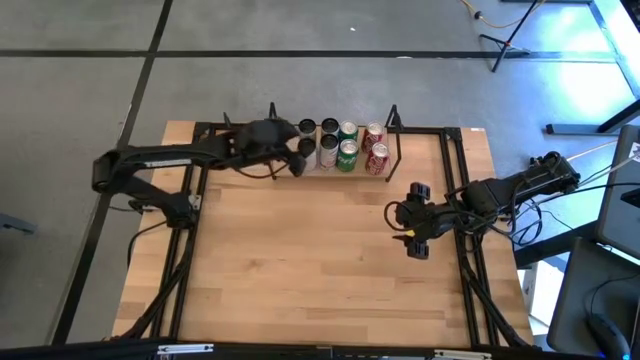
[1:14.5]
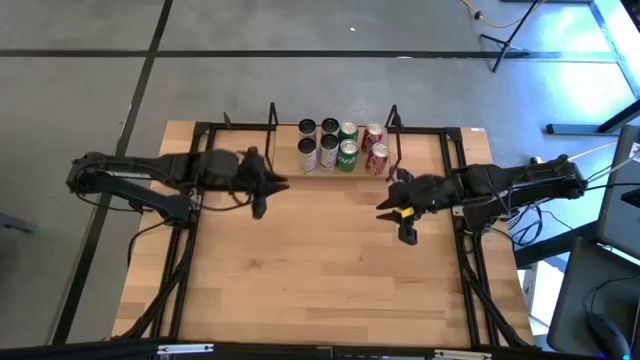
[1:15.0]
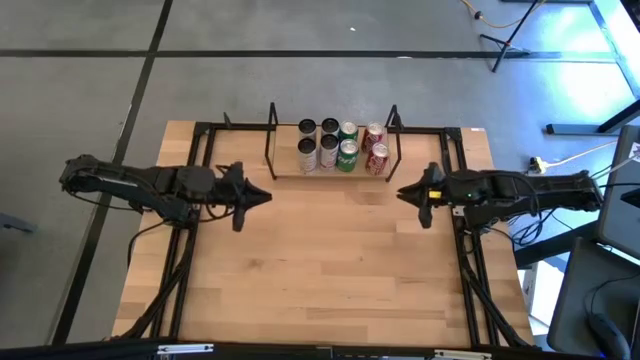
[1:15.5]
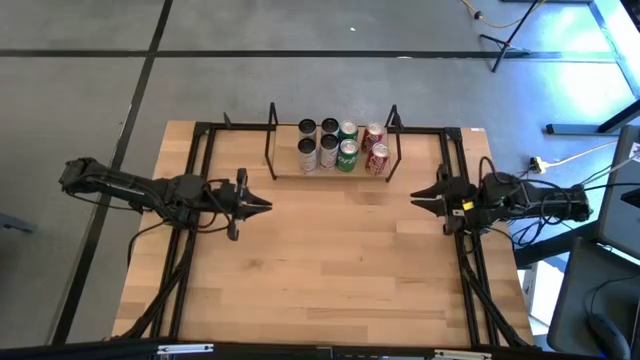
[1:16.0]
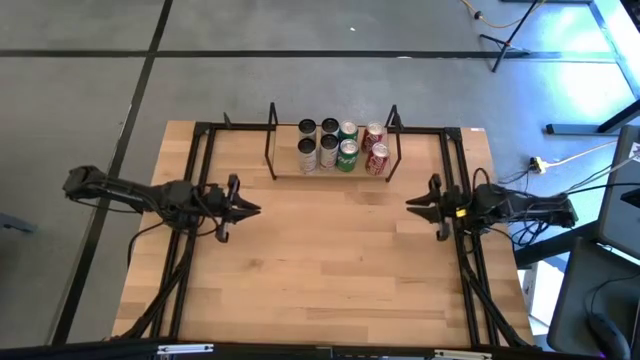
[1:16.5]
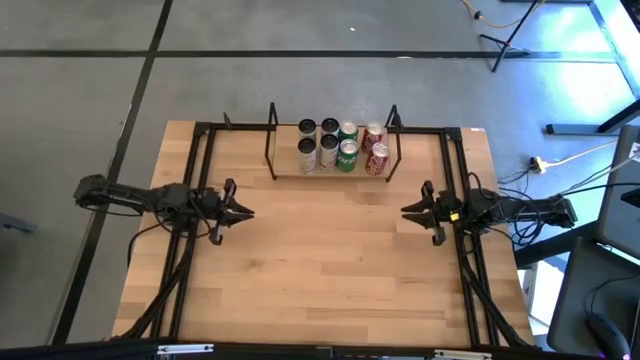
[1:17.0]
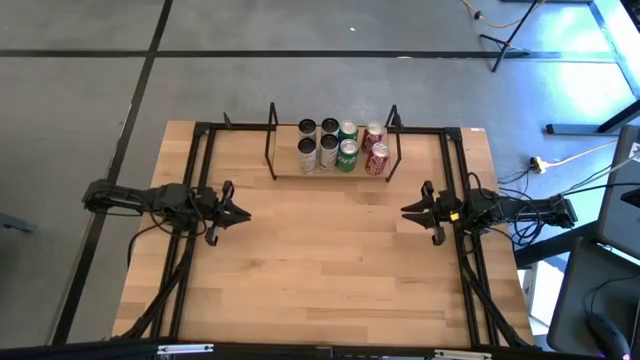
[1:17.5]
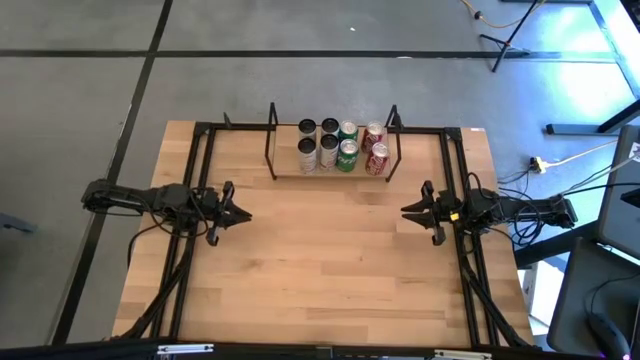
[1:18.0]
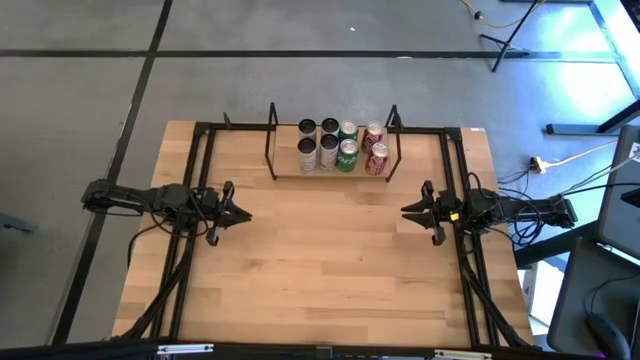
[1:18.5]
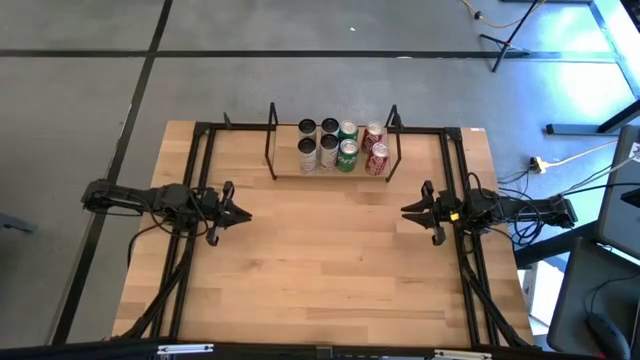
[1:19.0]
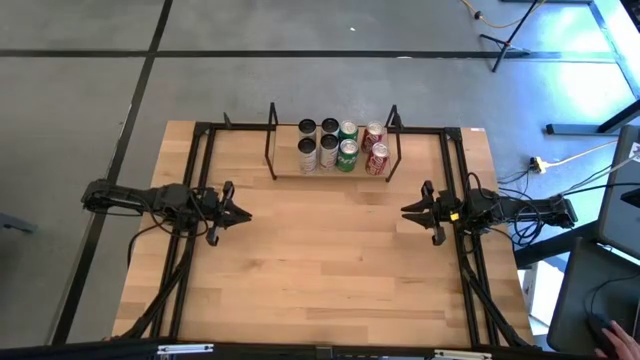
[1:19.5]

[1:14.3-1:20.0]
Task: Place canned beverage on shelf
Return to Home Position

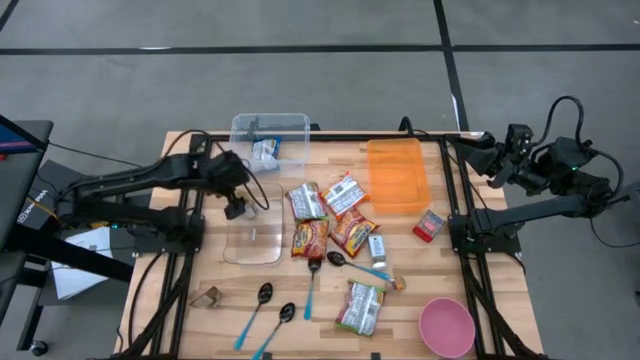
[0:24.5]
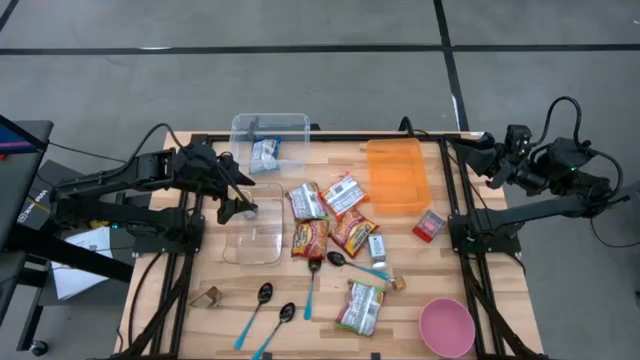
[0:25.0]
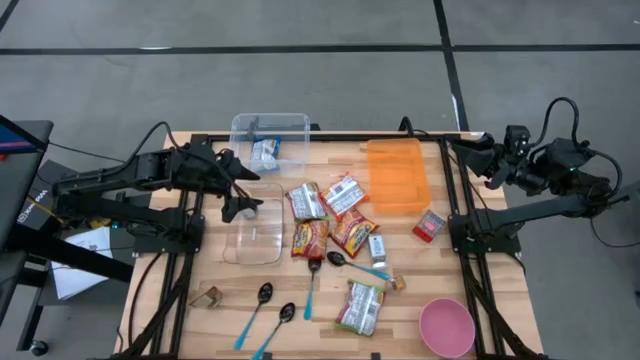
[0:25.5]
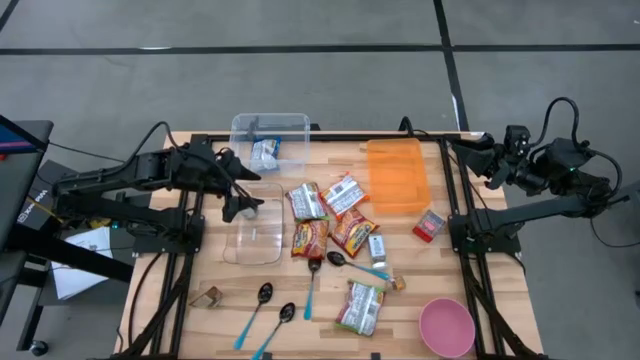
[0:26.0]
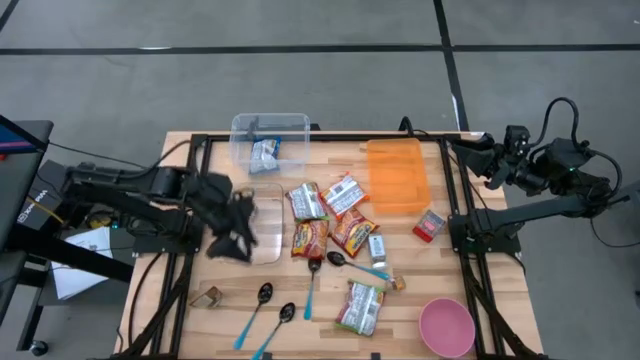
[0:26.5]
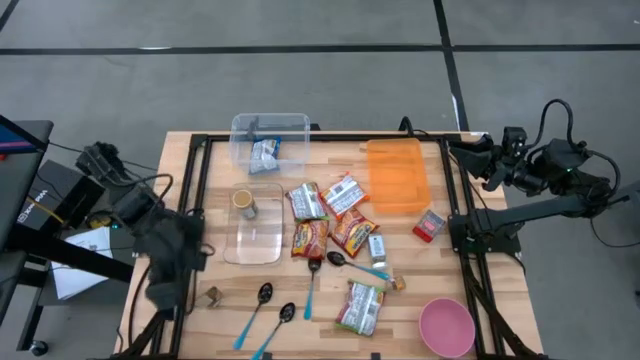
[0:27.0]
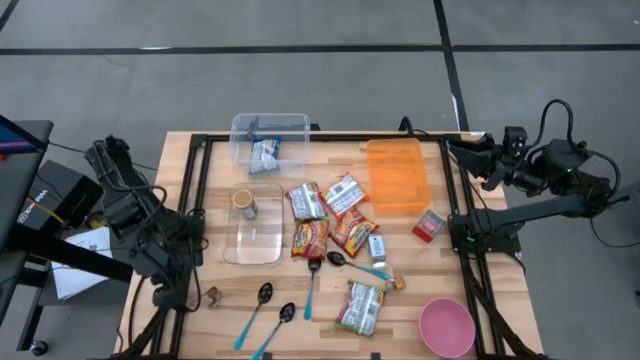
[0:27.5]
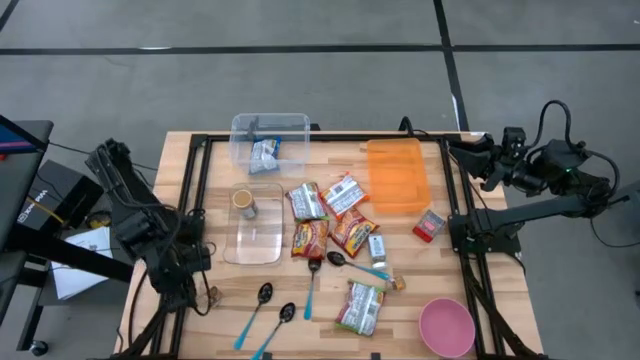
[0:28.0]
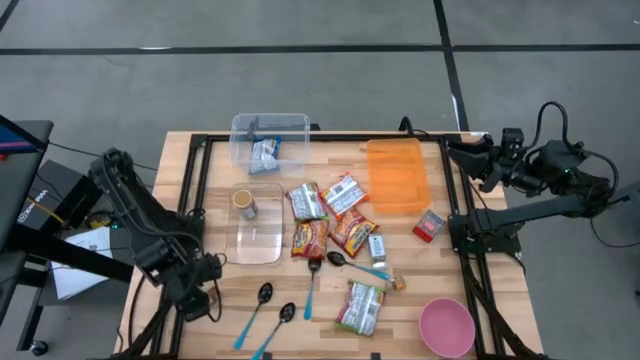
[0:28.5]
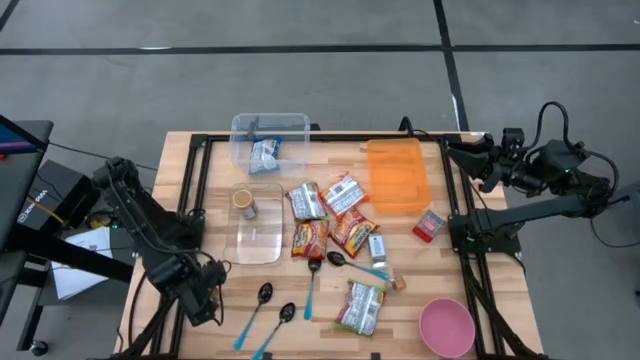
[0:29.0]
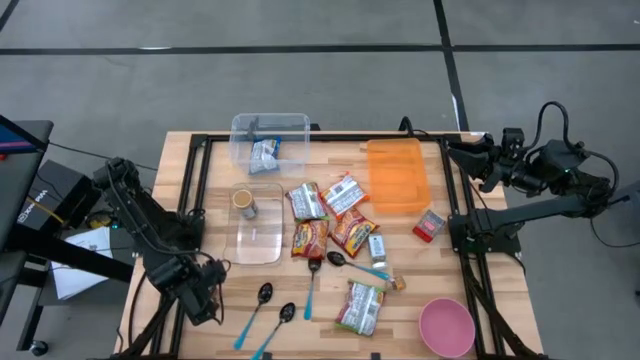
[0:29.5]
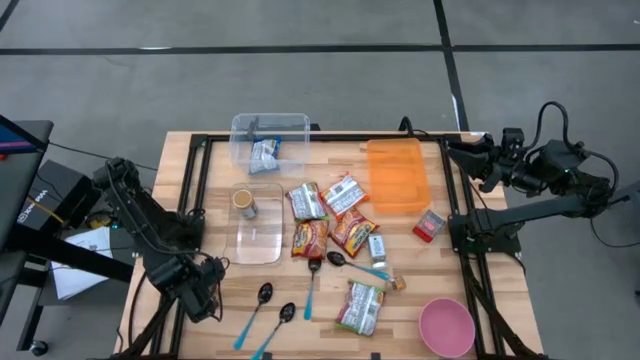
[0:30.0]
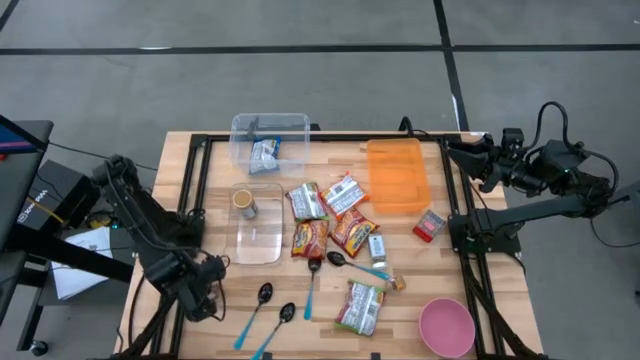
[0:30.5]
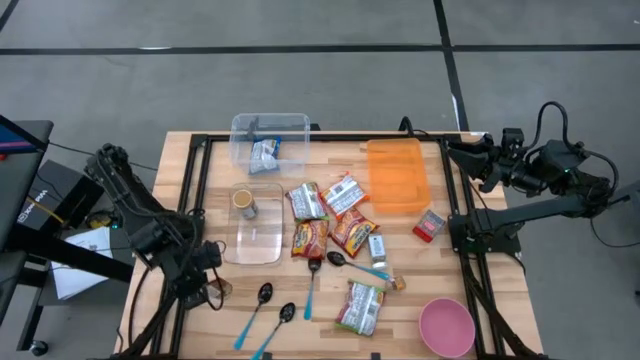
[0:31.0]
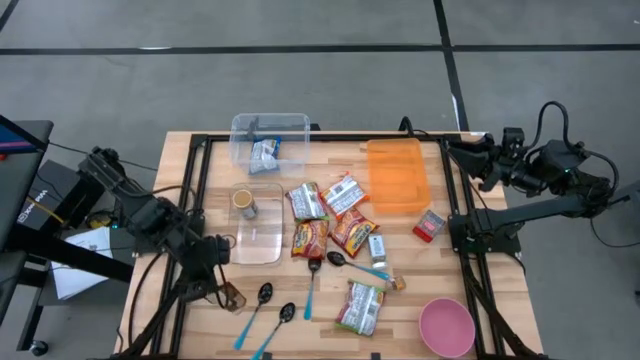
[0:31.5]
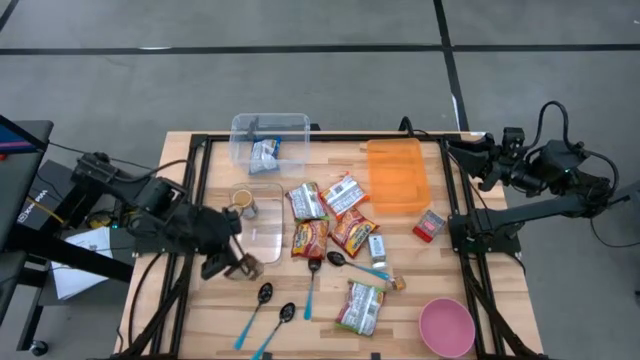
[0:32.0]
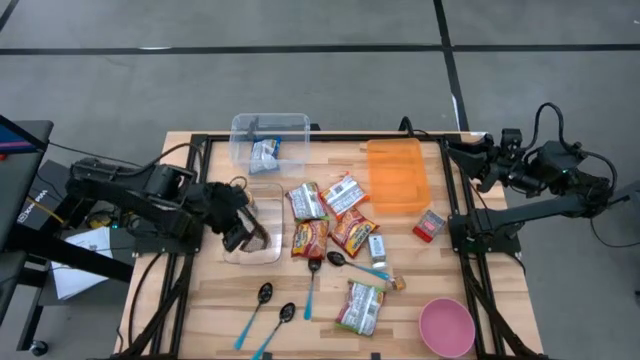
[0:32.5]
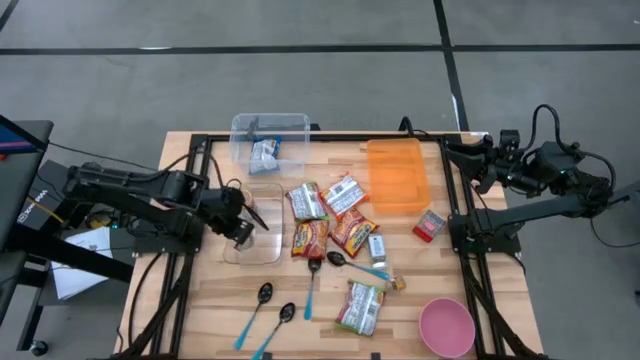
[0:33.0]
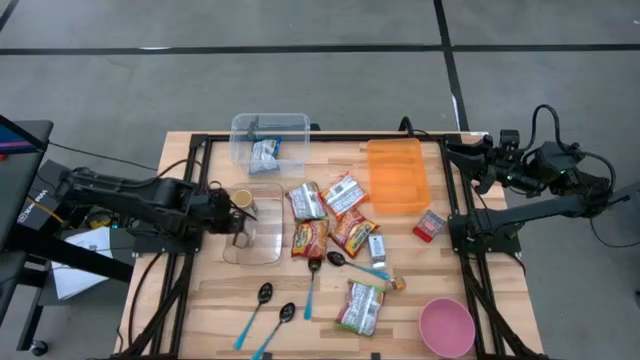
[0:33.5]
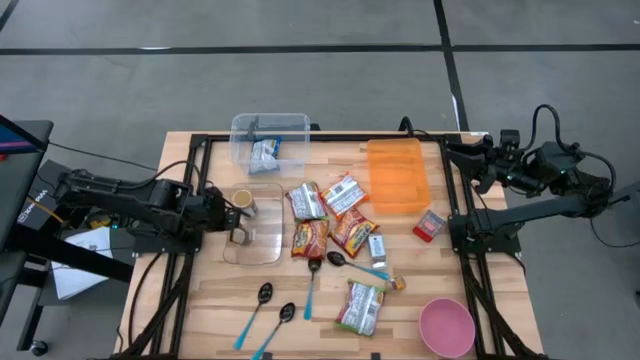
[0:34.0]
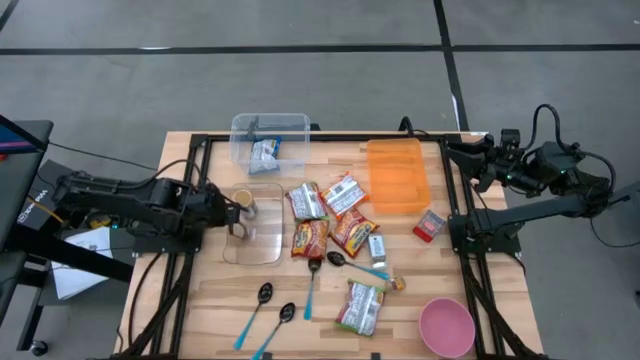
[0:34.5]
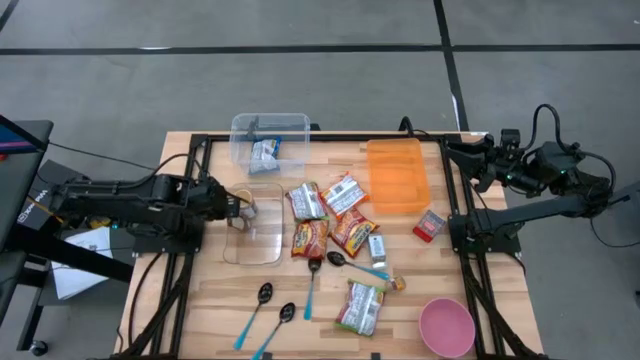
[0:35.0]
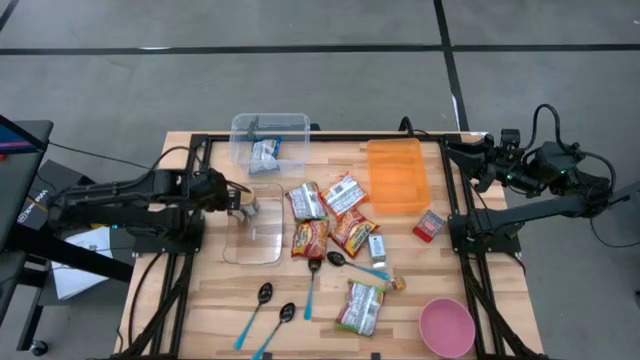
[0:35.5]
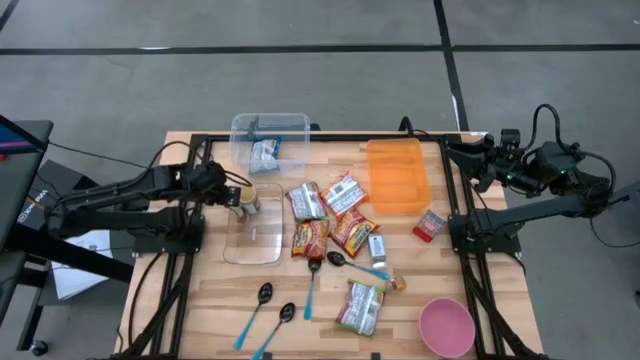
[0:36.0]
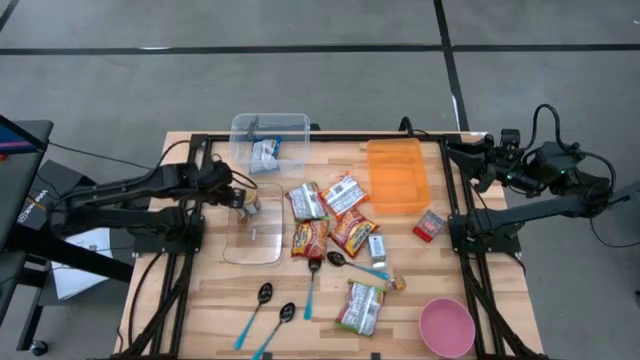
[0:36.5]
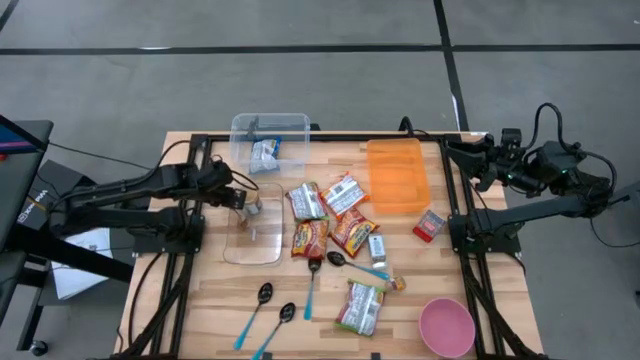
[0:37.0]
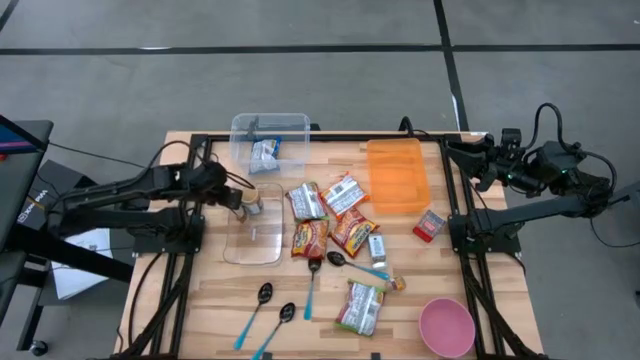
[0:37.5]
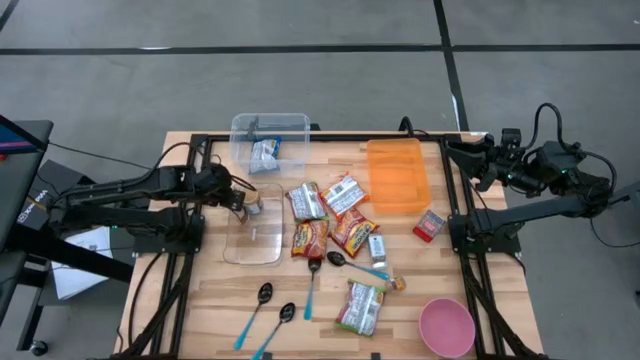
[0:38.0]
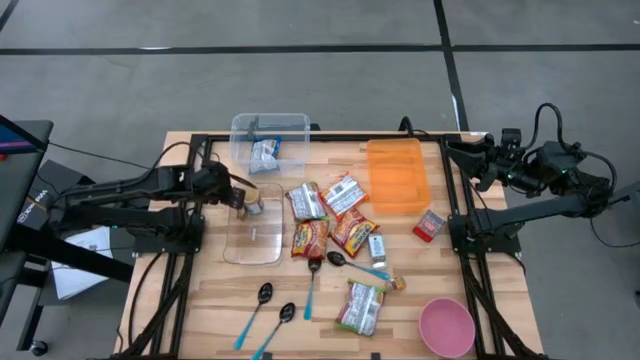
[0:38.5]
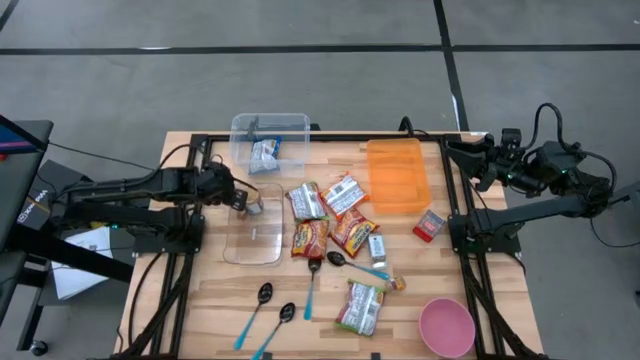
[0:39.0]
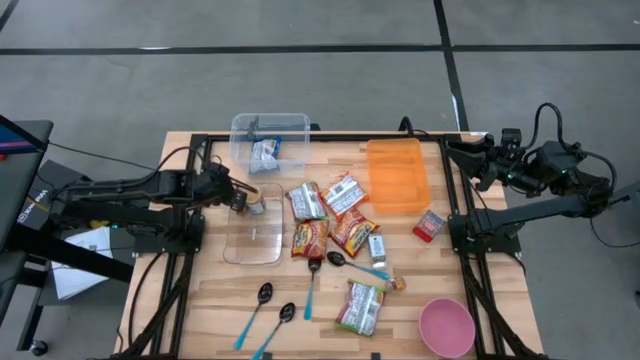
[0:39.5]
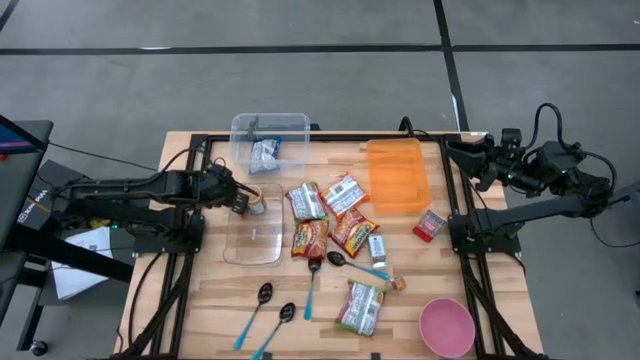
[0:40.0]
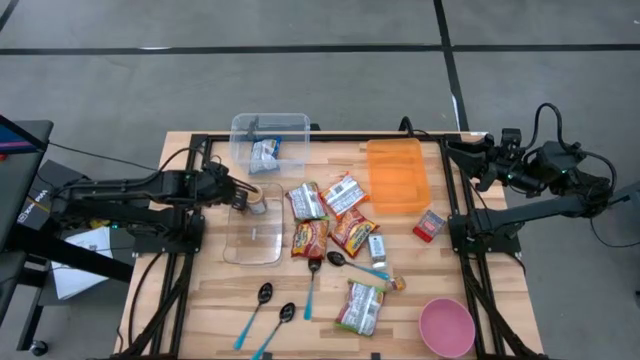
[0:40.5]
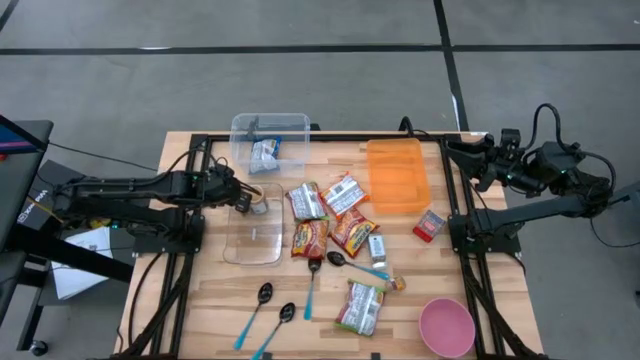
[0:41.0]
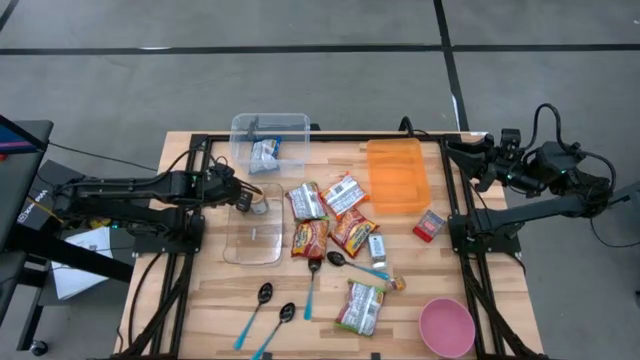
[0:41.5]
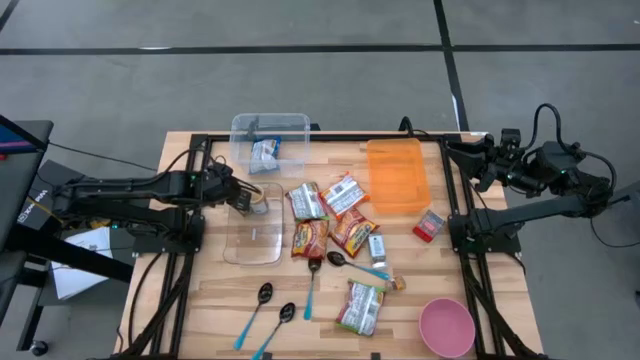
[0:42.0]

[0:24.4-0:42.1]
Task: Pick & Place Food Item
Put the orange seasoning pack into the transparent bin
